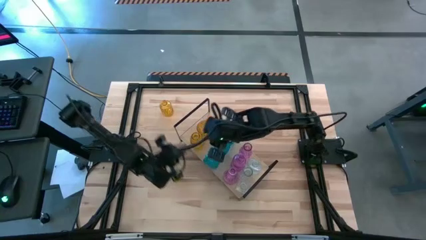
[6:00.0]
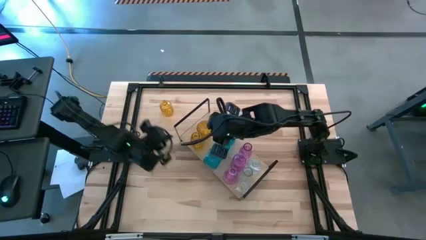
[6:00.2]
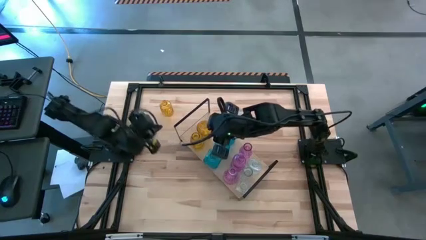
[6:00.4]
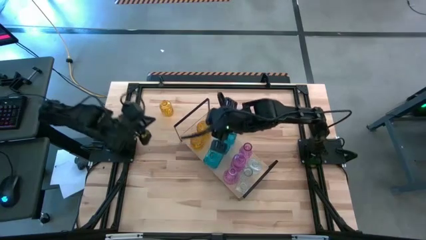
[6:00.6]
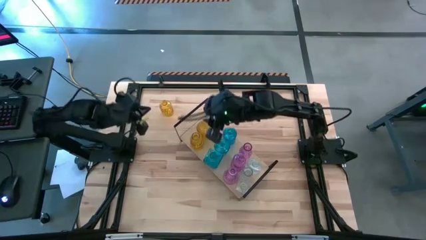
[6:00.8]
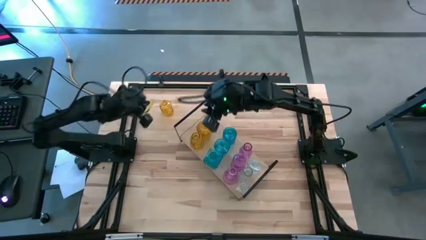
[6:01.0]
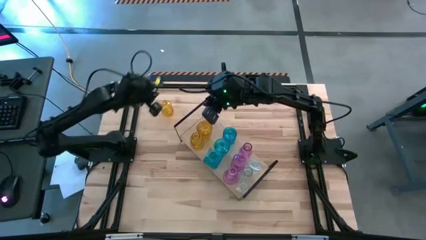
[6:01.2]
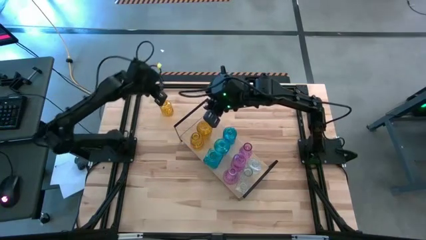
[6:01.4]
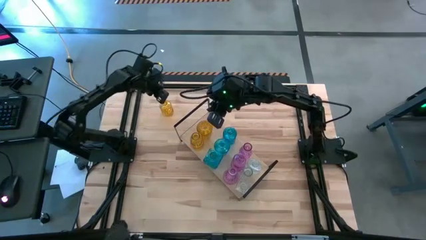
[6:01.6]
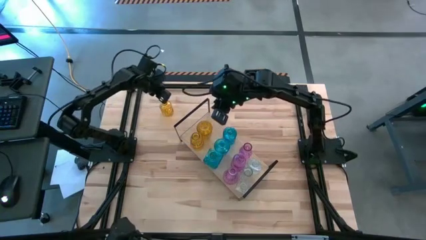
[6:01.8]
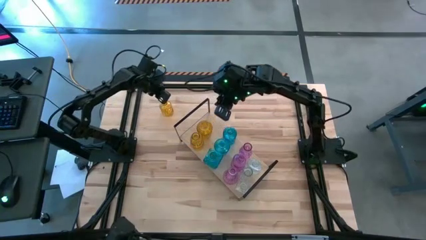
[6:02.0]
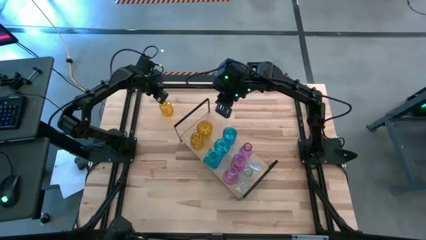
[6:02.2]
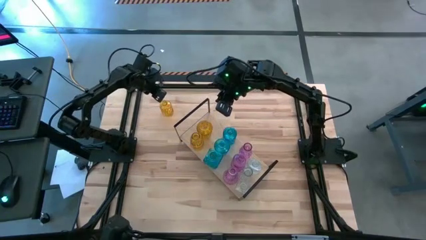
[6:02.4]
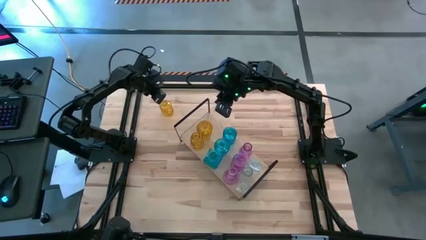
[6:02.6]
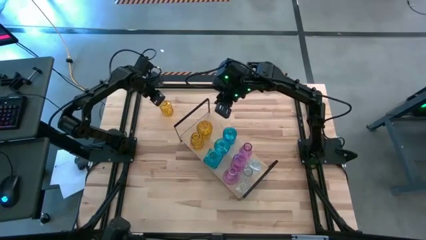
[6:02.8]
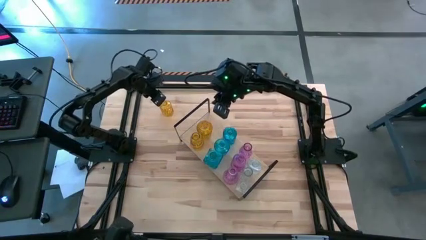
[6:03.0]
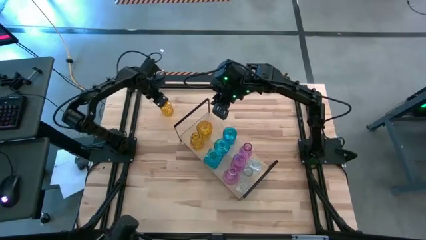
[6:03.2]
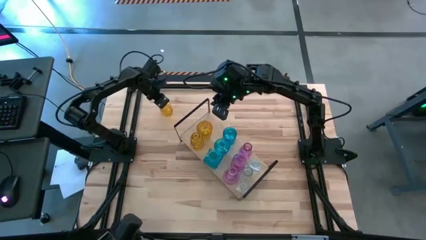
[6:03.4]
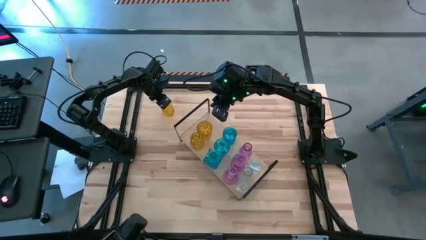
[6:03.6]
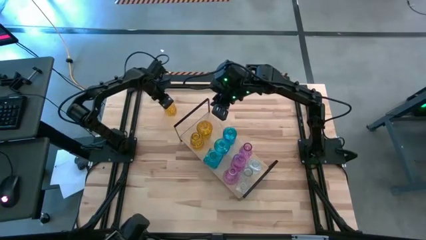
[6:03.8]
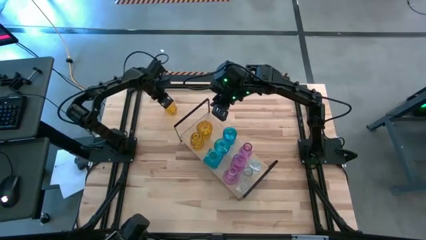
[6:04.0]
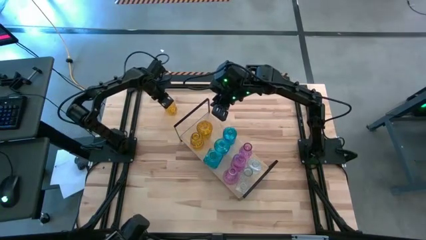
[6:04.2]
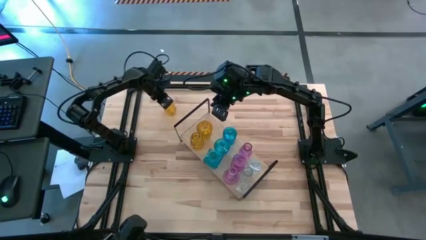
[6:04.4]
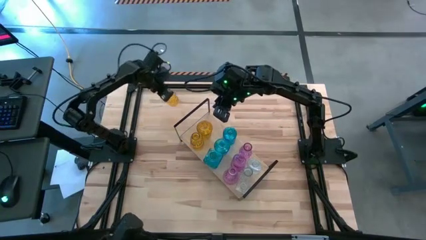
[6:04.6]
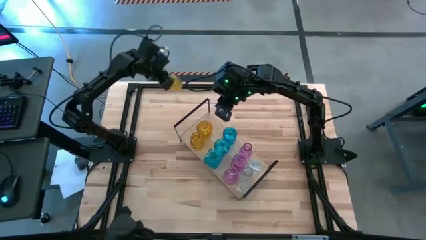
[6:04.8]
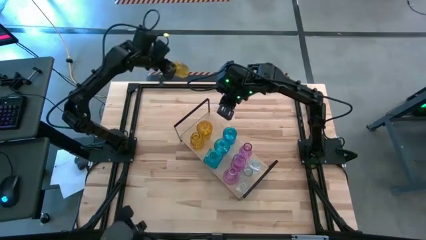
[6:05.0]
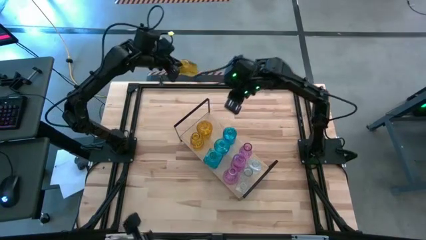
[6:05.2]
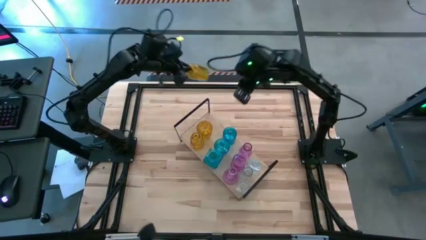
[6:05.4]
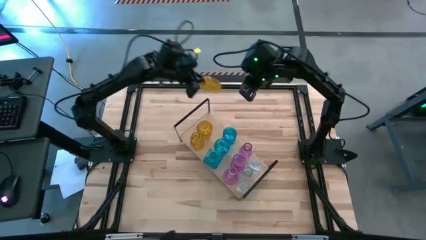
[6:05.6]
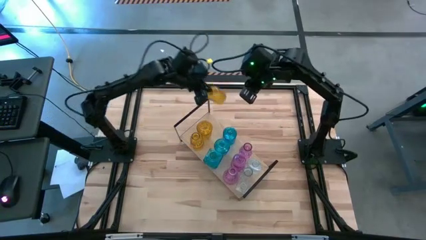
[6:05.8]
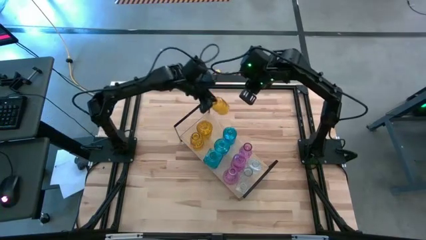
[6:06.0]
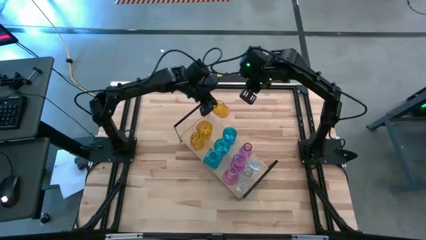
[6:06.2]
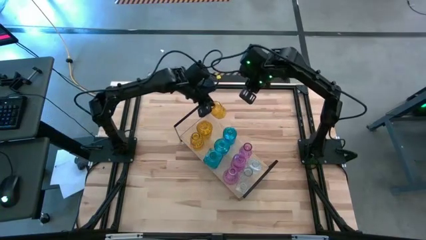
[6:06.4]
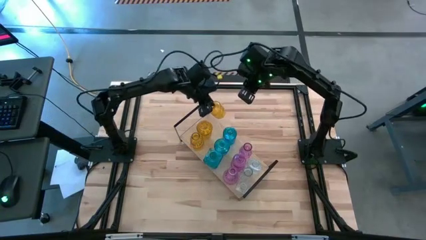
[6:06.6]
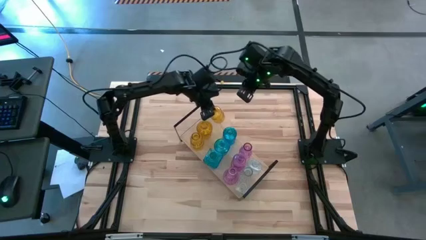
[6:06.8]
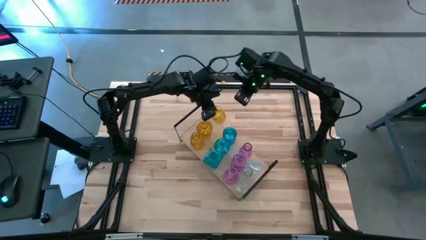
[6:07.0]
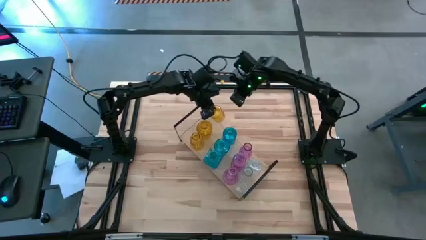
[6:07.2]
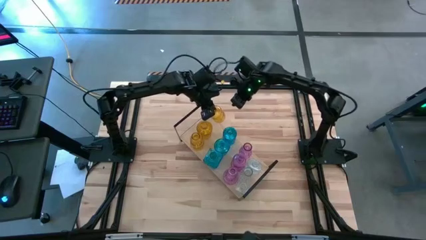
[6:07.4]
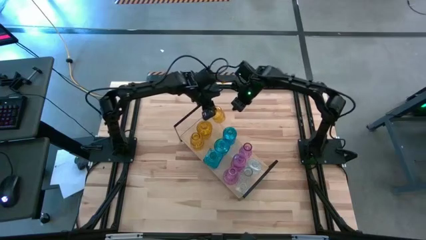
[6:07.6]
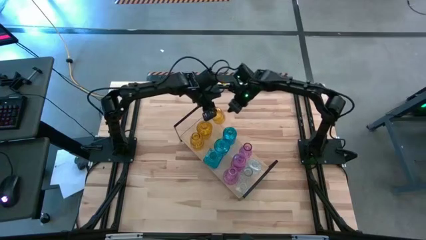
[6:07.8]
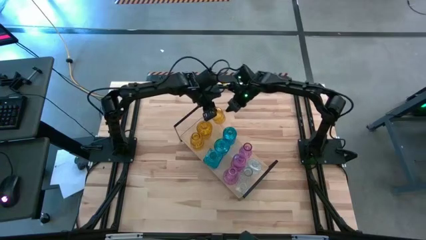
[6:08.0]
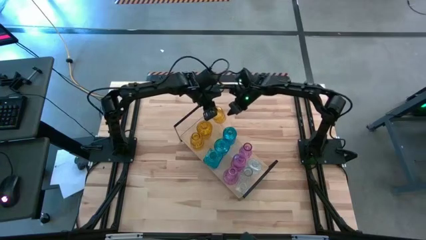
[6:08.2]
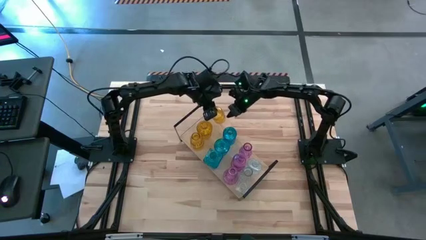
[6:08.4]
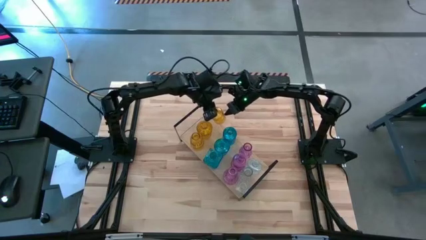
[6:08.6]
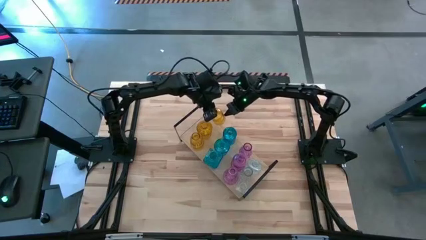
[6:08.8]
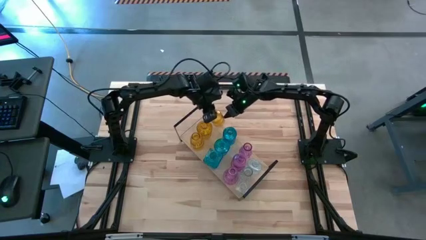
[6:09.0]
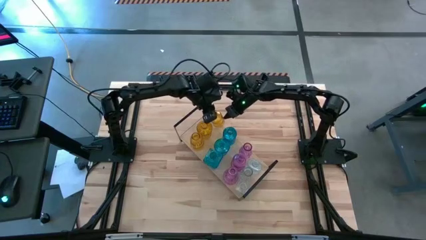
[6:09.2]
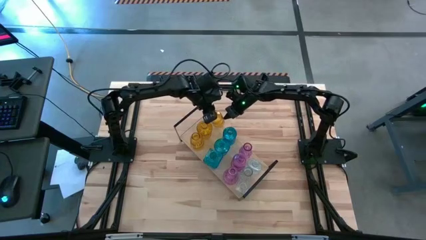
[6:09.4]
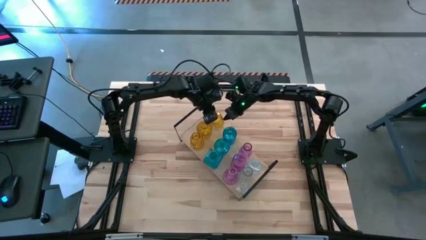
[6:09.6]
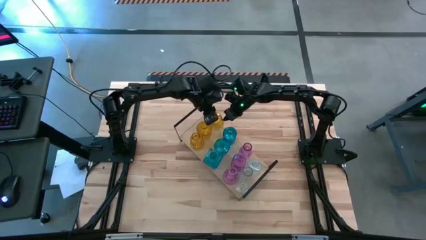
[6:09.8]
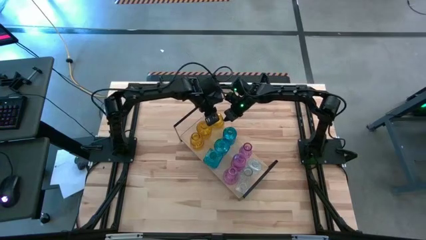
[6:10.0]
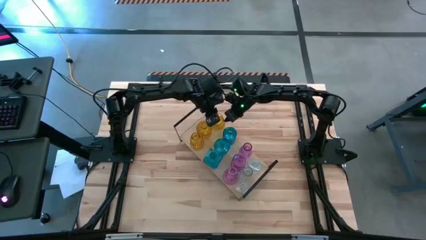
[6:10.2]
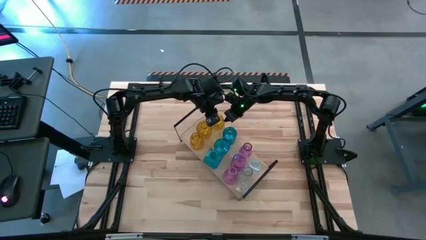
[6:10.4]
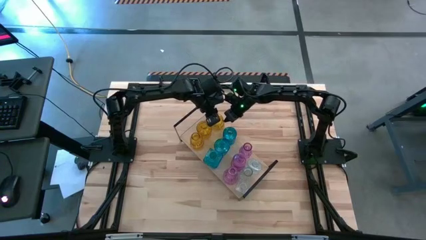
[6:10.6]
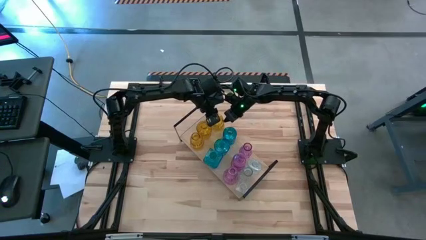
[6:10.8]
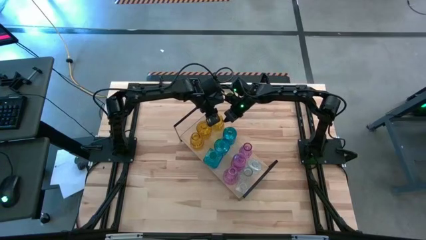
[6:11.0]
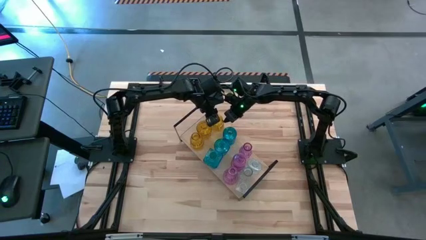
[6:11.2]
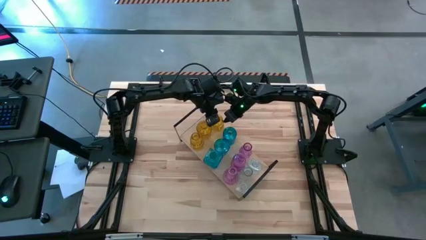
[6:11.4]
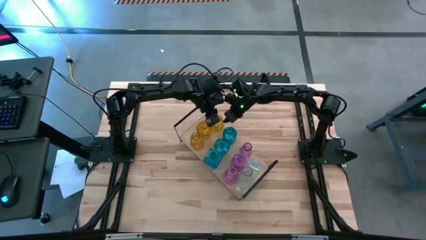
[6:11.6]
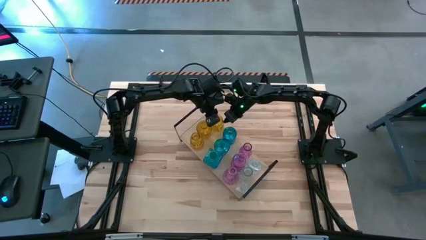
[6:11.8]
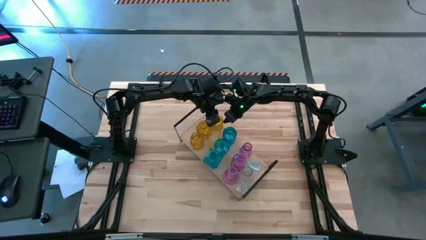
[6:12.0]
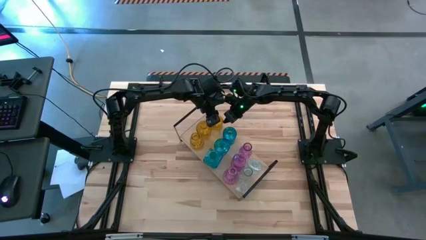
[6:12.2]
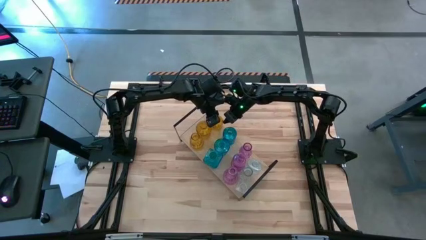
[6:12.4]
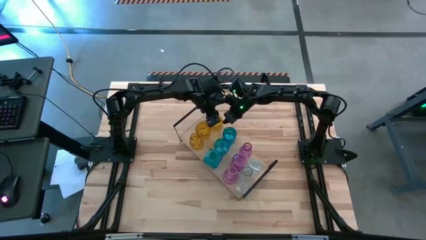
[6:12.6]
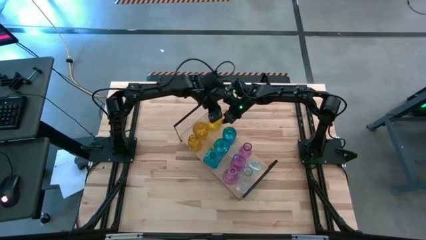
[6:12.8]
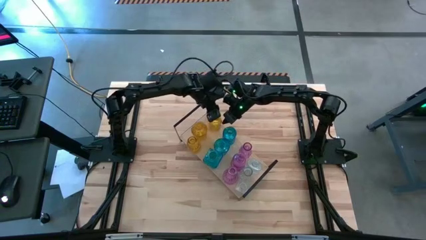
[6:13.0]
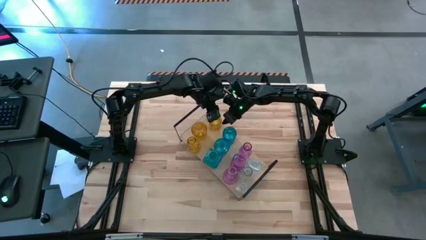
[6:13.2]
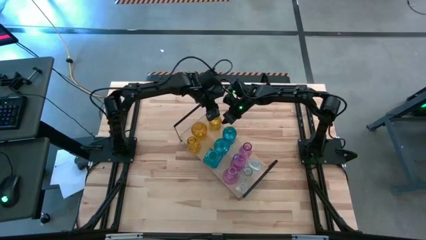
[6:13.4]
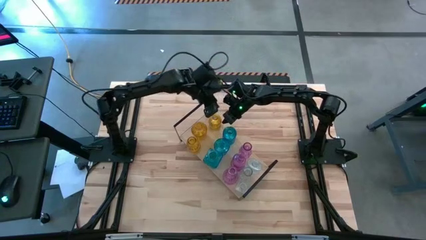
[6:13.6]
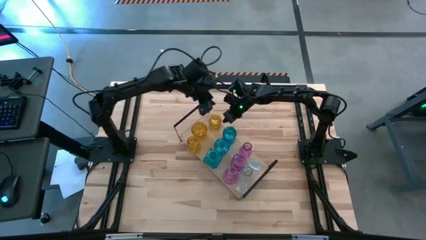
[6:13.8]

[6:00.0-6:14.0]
Task: sort vases onto shelf
Put the yellow crystal vase on the shelf
